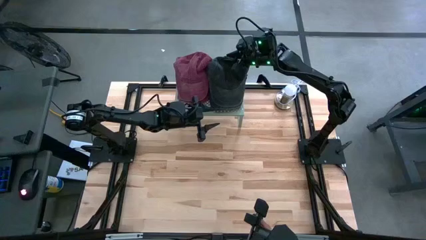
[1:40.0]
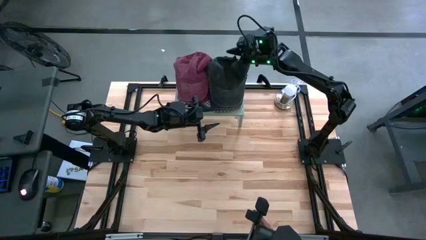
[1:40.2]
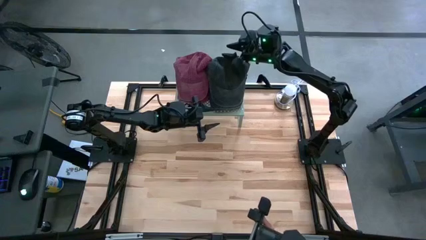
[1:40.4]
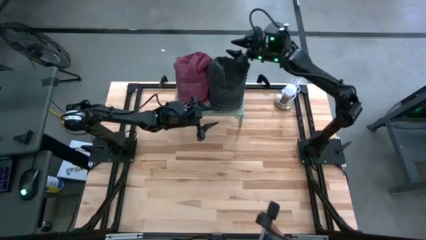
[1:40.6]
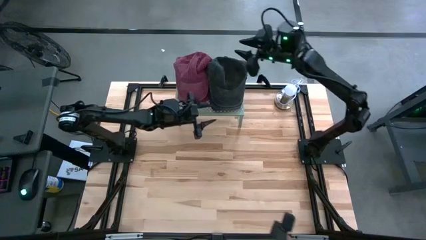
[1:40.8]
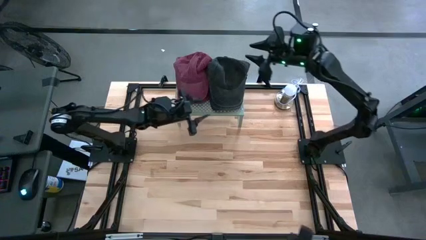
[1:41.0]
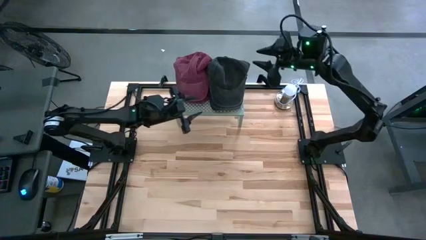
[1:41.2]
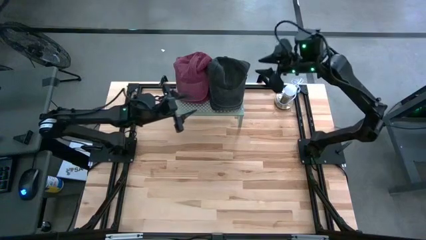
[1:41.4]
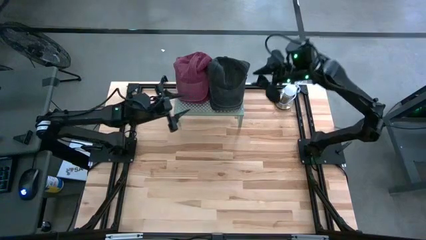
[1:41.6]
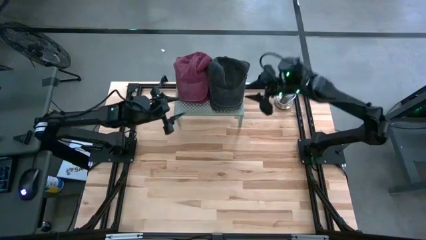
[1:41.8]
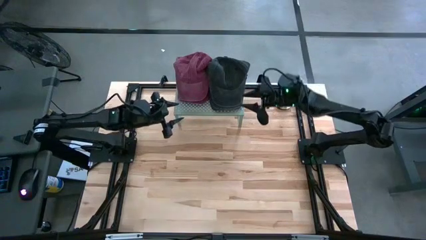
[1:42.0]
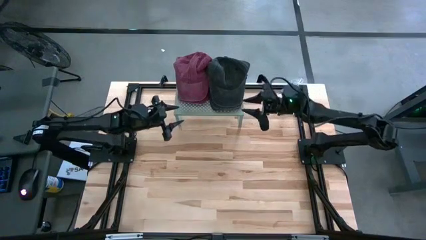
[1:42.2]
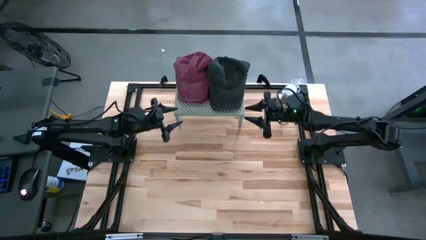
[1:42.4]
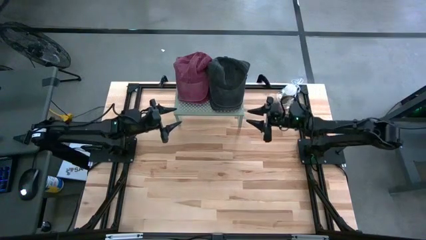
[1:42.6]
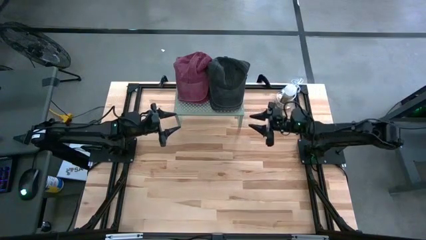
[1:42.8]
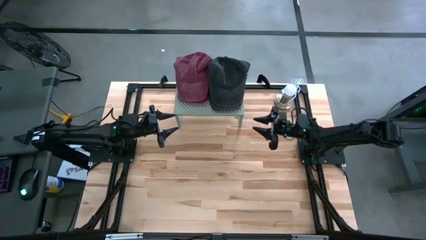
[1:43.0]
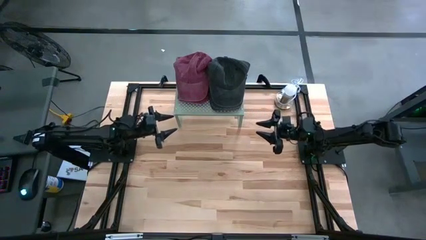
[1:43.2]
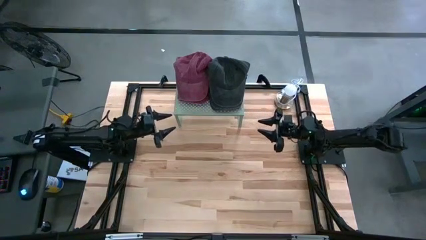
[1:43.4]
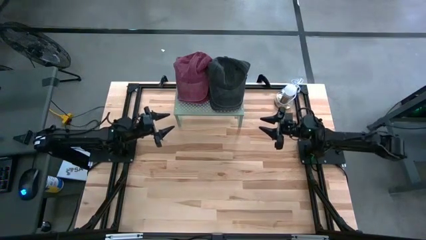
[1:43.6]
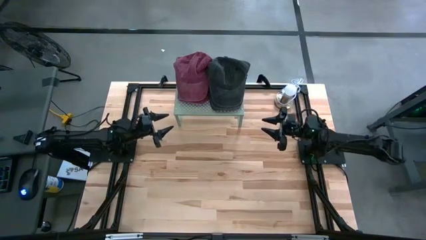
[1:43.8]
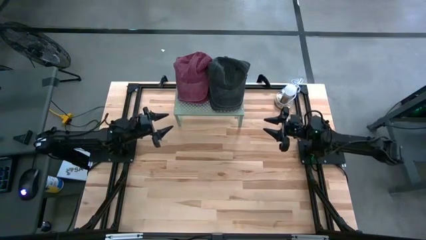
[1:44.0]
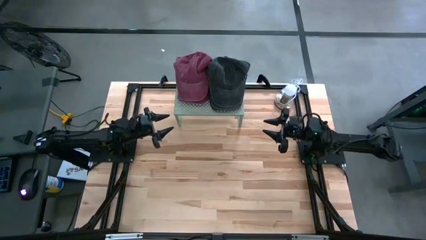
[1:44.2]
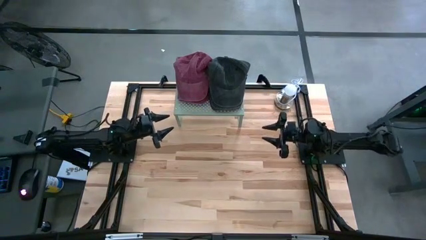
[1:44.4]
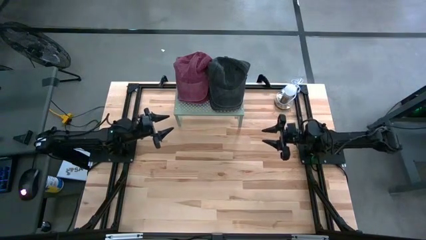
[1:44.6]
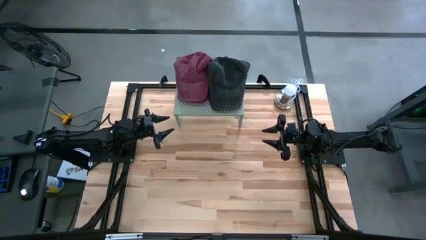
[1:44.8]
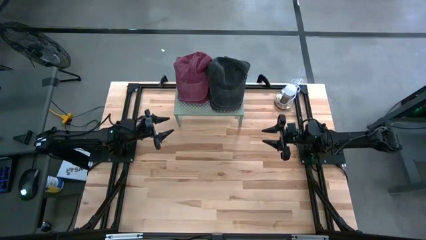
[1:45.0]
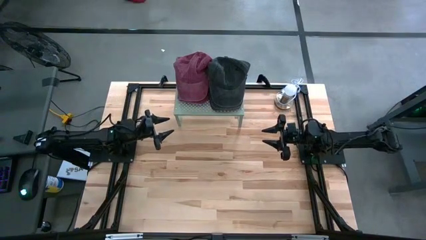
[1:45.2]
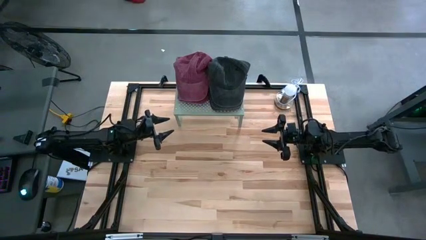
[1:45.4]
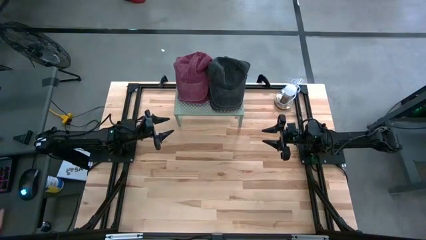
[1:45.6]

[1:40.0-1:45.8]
Task: Pick & Place hat
Return to Home Position

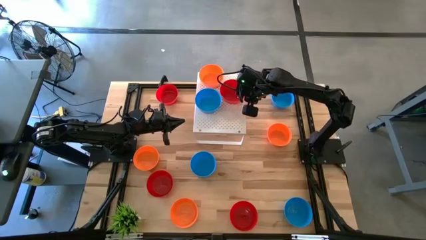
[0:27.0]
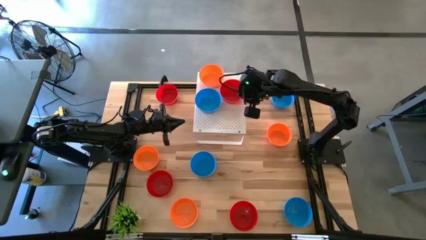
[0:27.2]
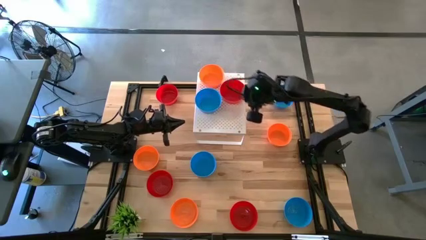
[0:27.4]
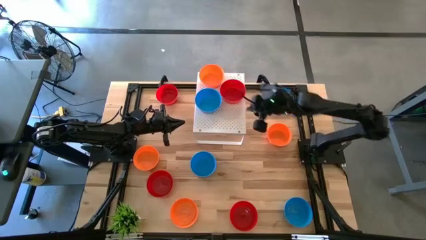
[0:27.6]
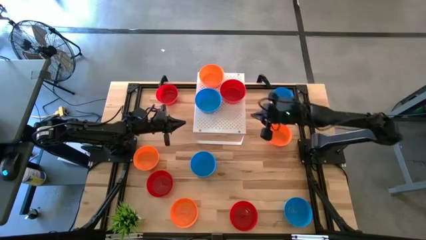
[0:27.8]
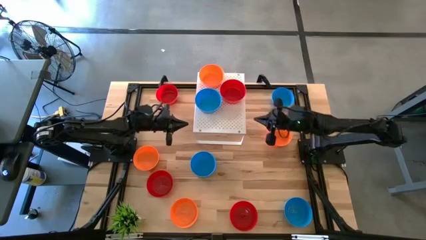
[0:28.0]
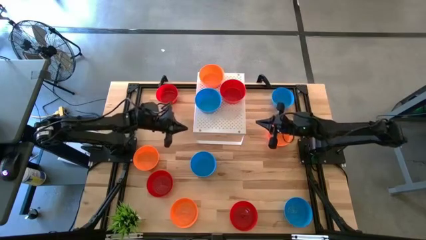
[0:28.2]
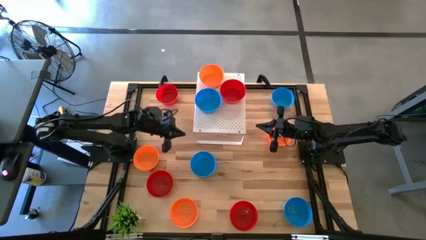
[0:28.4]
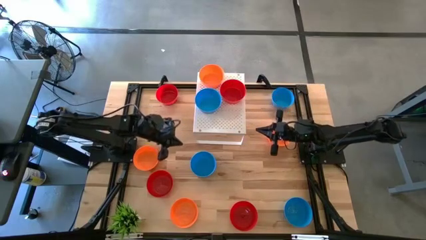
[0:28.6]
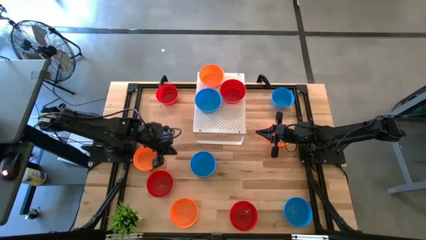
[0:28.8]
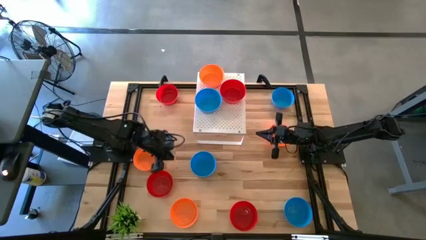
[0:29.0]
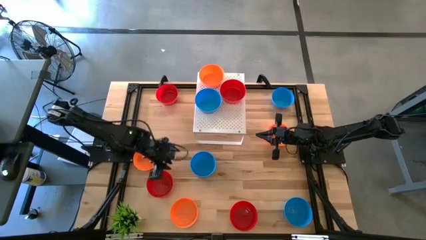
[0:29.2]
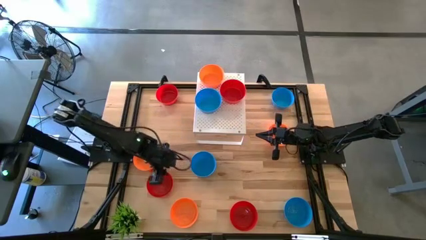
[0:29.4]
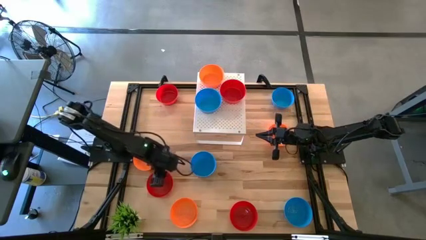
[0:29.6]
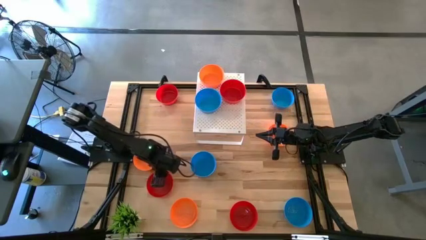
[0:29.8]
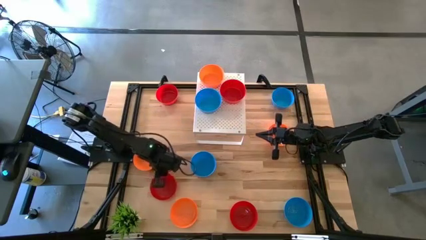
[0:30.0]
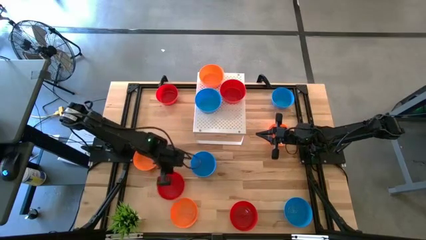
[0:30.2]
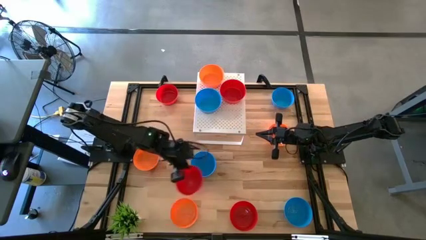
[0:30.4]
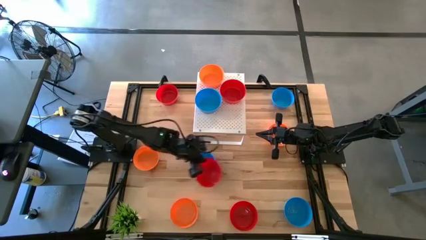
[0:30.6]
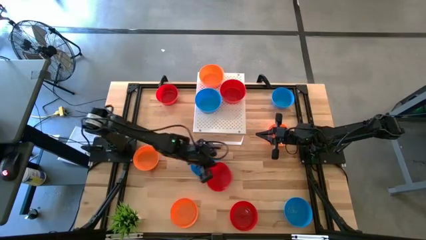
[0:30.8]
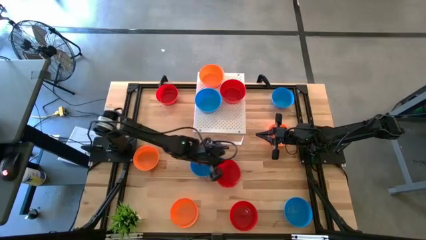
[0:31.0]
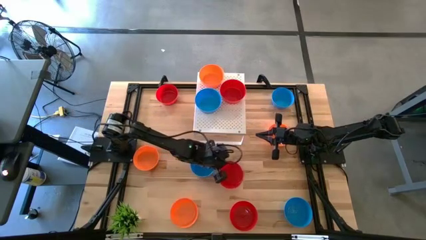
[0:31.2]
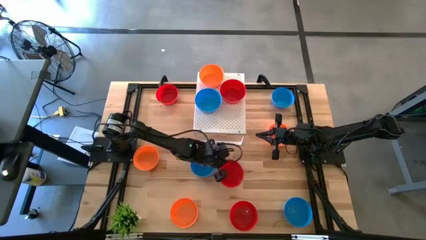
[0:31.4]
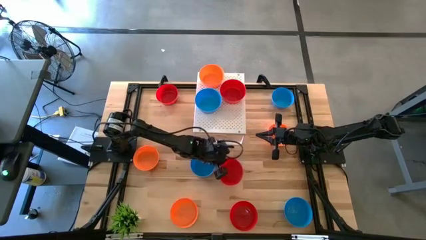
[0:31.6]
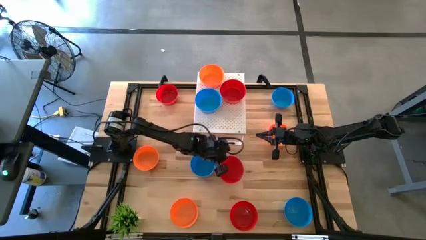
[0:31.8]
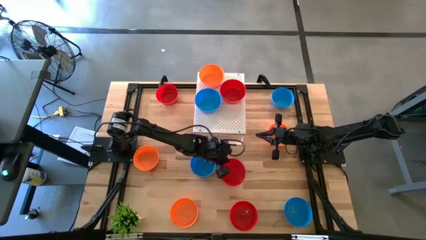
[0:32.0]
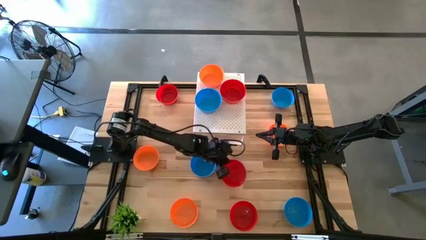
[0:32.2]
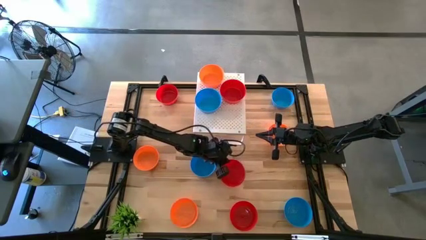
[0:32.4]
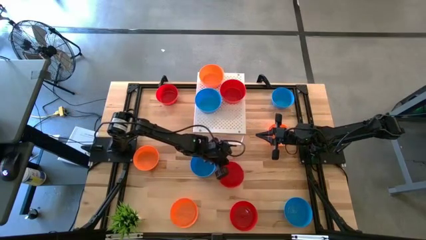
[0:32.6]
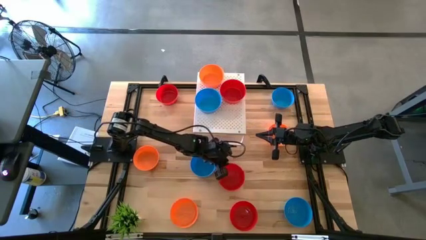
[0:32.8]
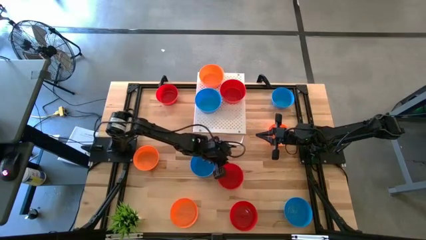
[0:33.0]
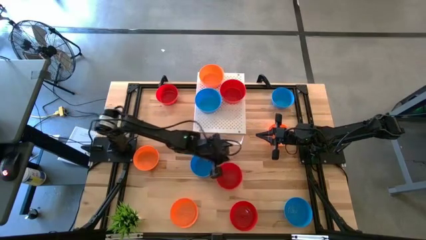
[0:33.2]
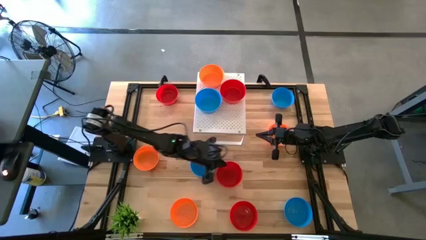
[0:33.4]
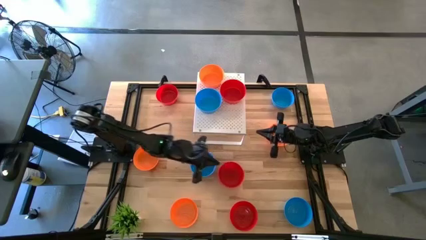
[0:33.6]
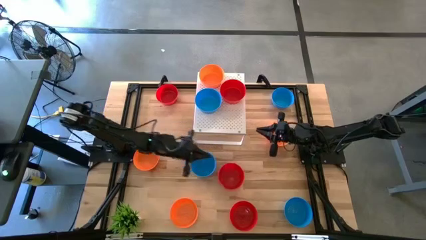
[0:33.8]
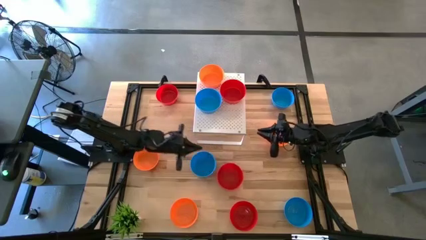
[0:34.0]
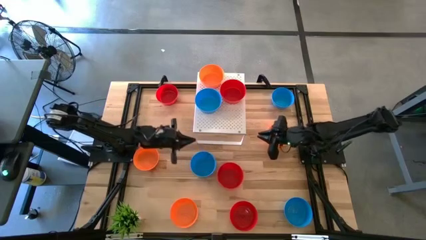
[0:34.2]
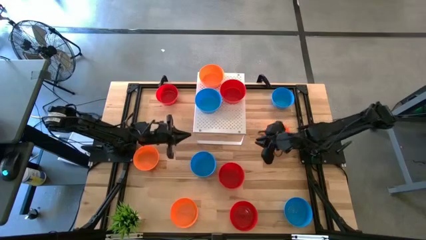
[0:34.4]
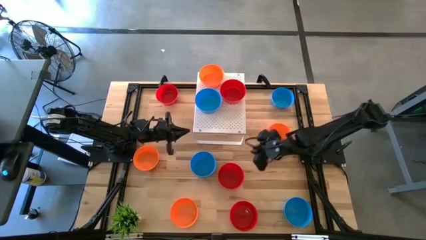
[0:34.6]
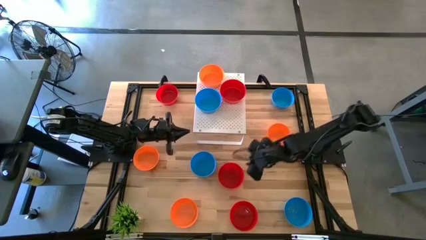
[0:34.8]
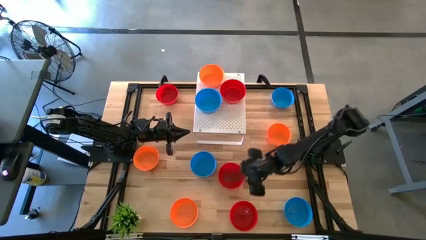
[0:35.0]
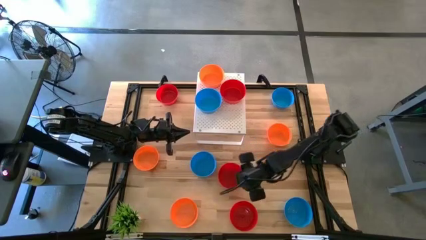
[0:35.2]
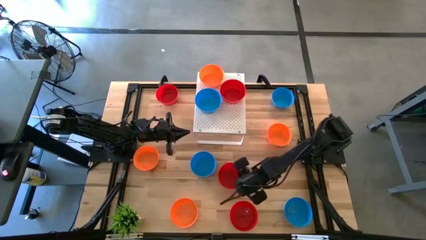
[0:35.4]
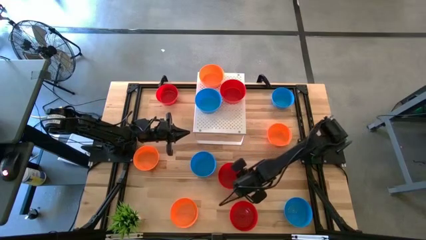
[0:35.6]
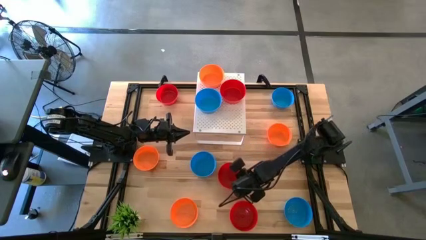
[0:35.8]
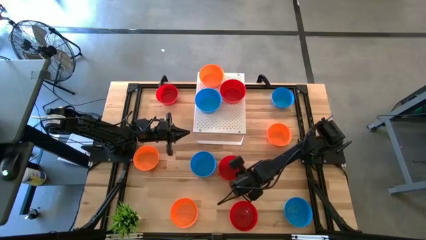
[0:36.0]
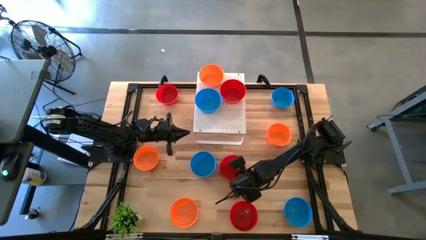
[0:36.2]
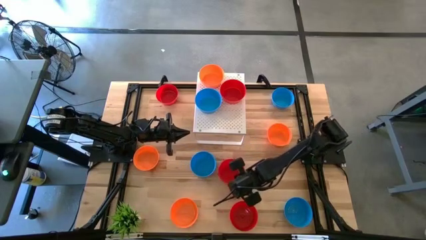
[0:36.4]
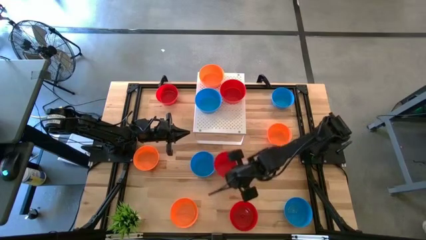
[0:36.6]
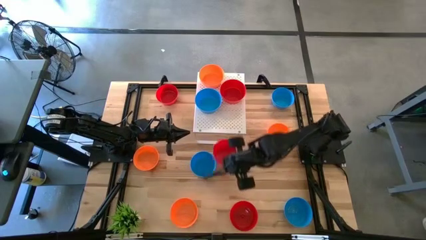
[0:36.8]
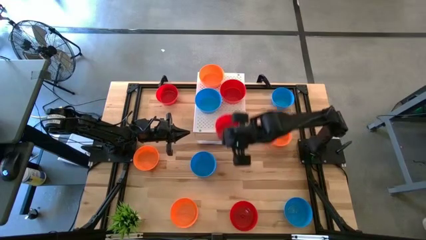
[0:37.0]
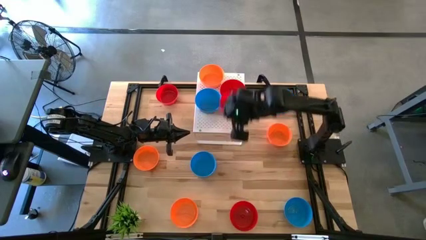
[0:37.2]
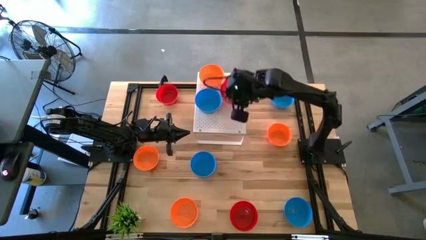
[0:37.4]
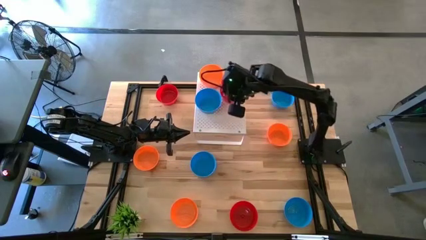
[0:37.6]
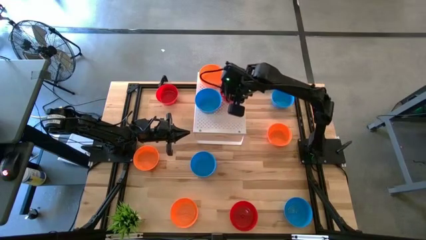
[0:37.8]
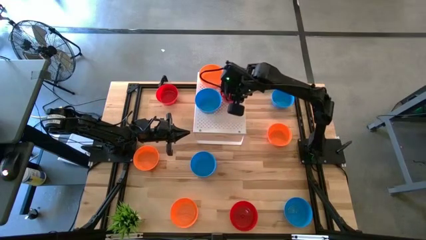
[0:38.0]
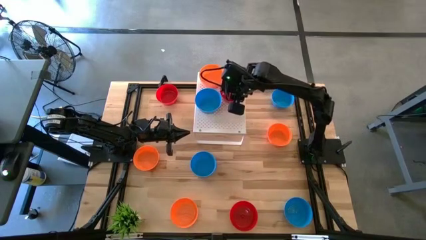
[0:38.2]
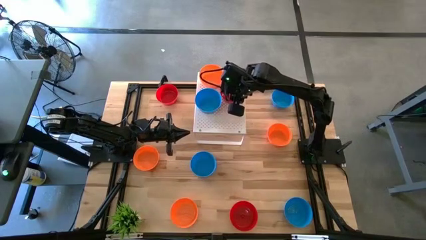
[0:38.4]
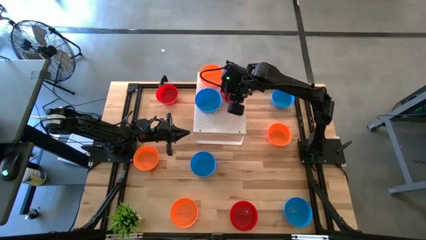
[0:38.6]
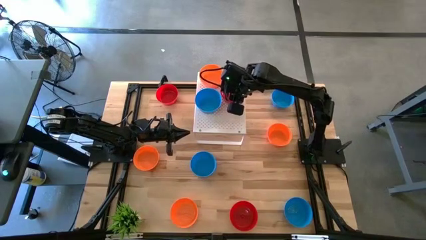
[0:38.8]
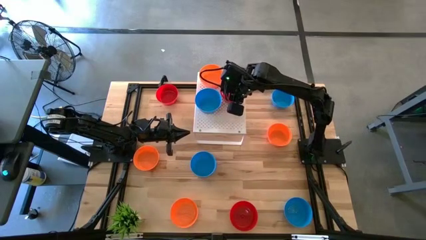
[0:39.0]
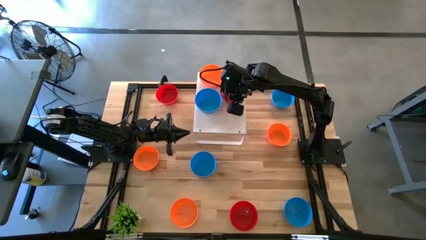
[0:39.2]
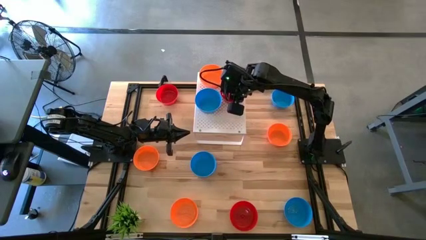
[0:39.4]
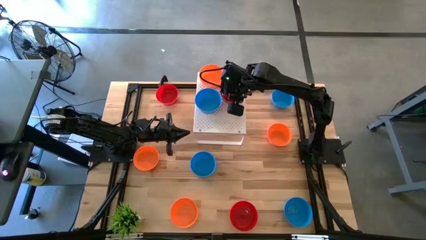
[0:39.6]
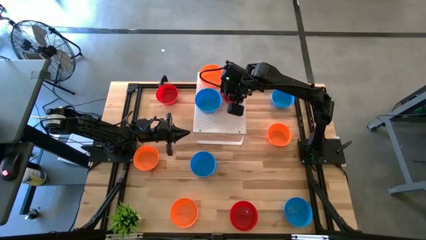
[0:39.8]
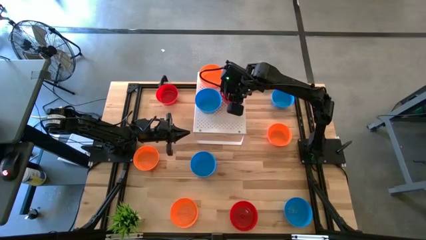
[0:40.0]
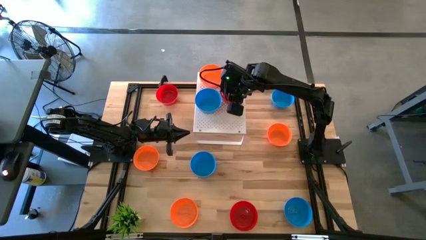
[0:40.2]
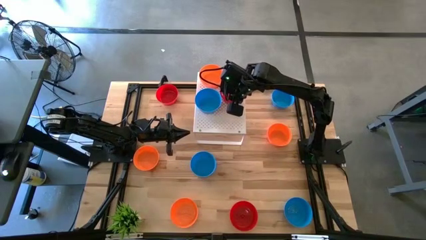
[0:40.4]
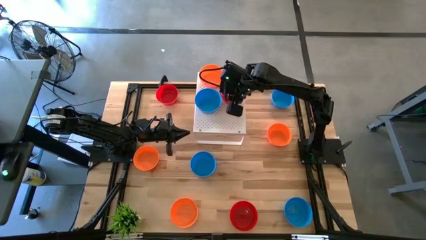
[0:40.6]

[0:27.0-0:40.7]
Task: Pick & Place Mini bowls
Stack the red bowl on top of the red bowl on the shelf
